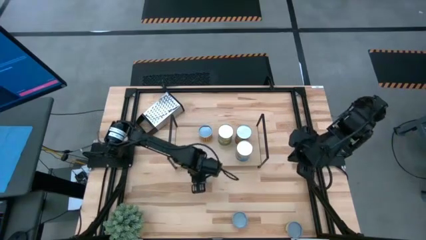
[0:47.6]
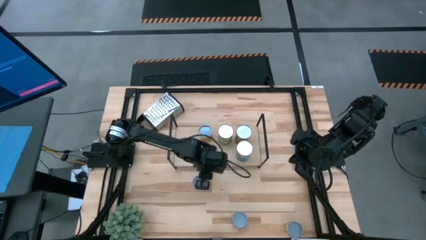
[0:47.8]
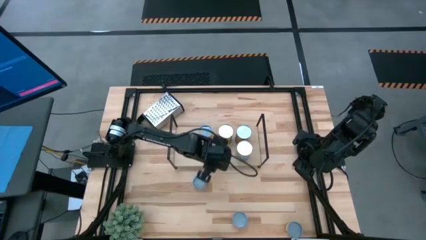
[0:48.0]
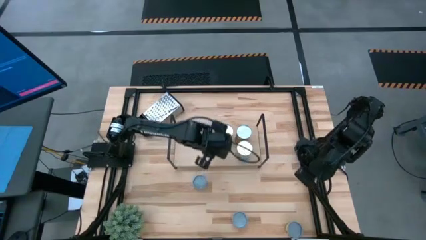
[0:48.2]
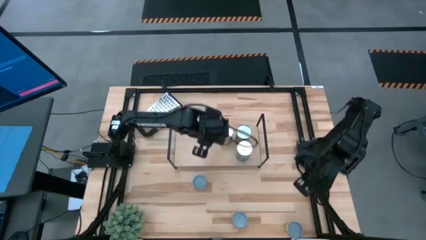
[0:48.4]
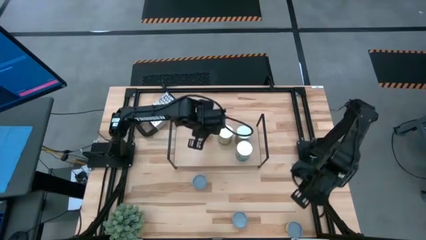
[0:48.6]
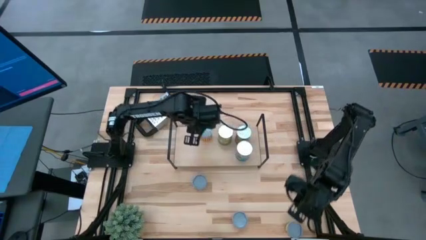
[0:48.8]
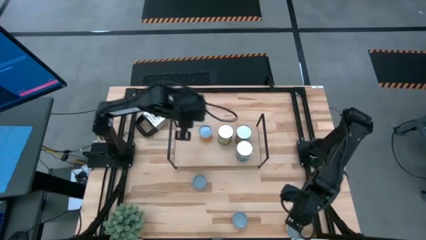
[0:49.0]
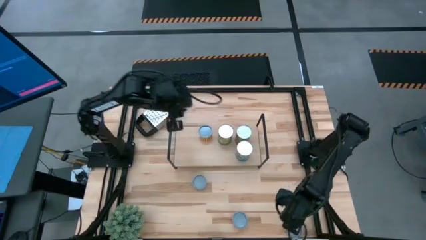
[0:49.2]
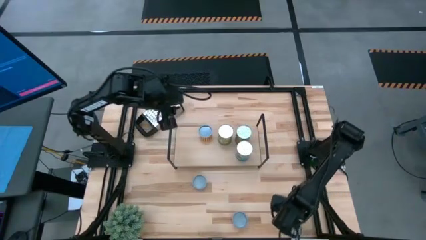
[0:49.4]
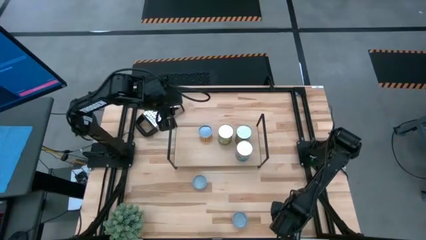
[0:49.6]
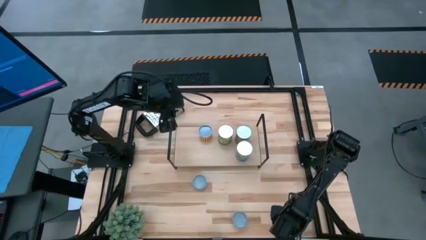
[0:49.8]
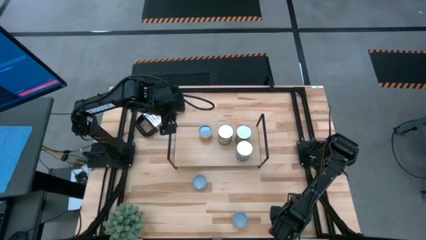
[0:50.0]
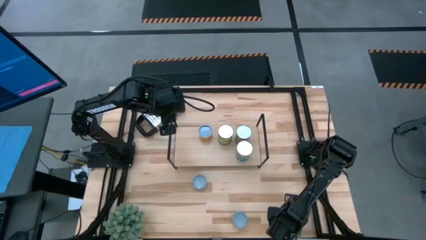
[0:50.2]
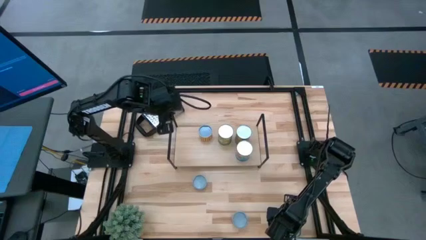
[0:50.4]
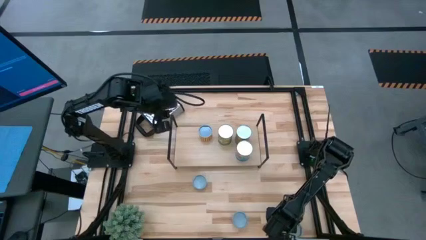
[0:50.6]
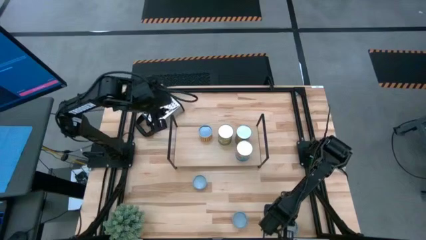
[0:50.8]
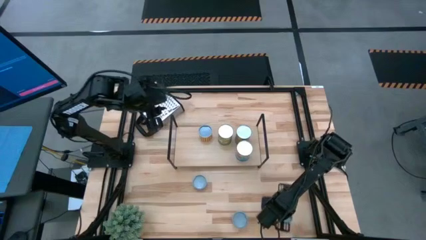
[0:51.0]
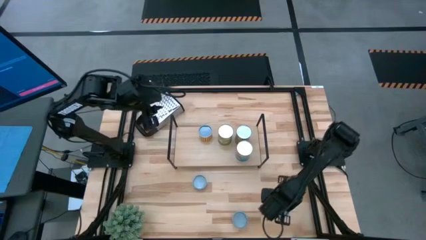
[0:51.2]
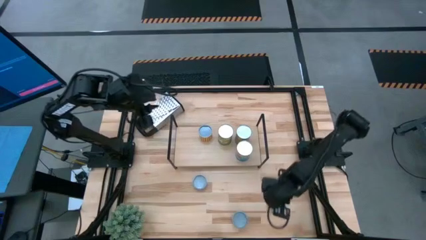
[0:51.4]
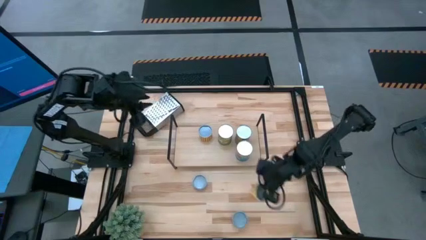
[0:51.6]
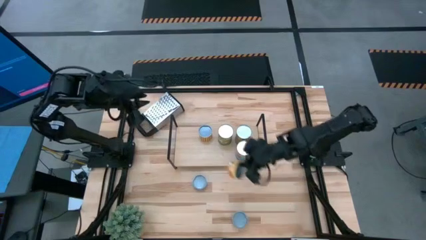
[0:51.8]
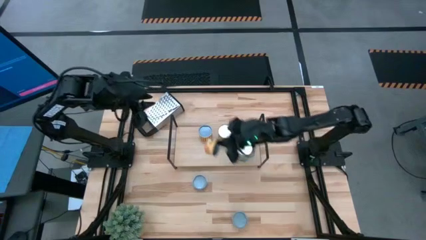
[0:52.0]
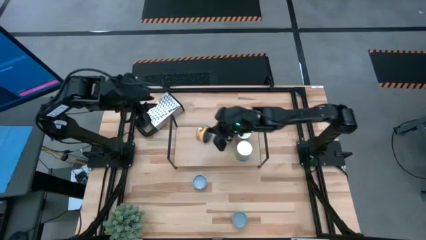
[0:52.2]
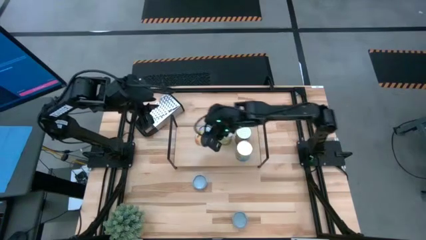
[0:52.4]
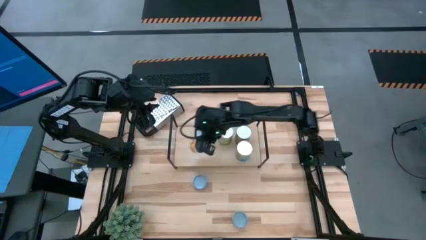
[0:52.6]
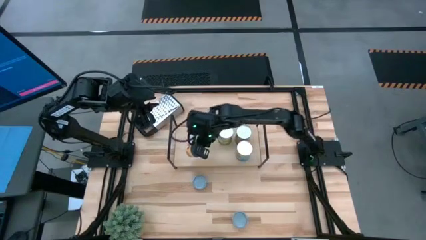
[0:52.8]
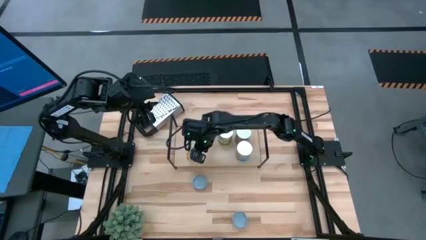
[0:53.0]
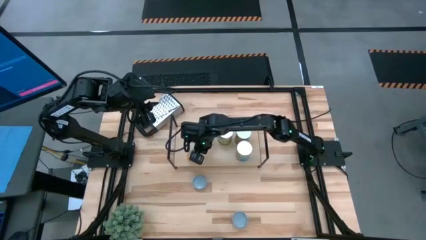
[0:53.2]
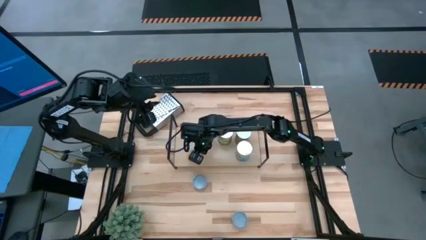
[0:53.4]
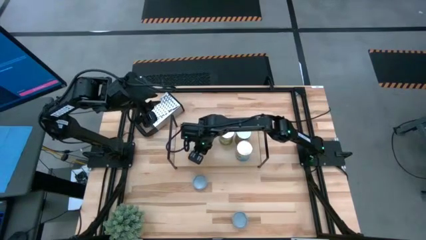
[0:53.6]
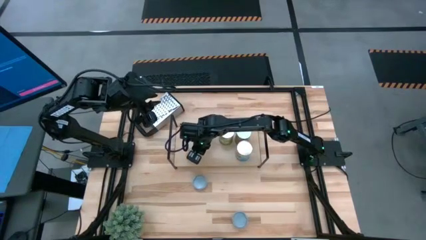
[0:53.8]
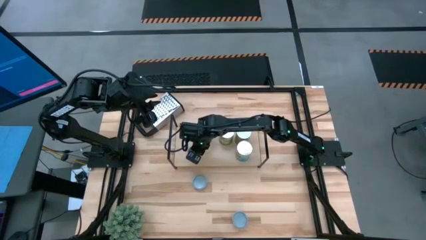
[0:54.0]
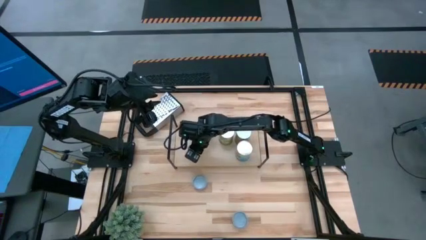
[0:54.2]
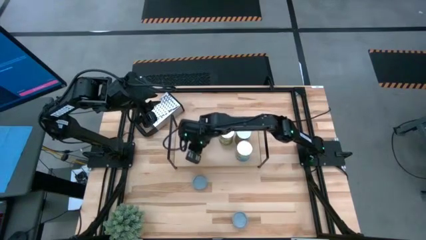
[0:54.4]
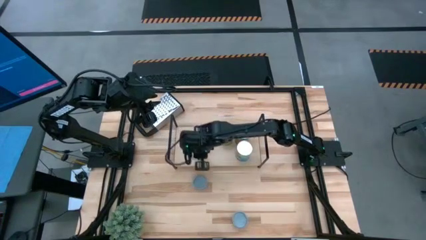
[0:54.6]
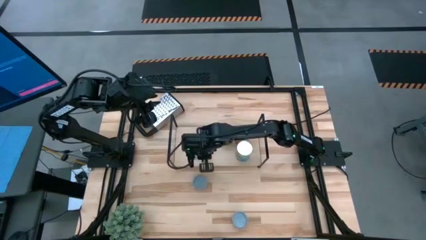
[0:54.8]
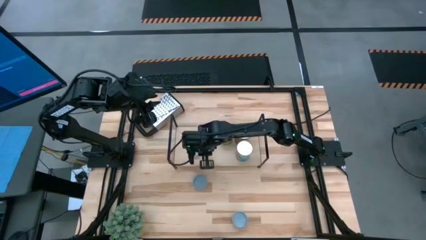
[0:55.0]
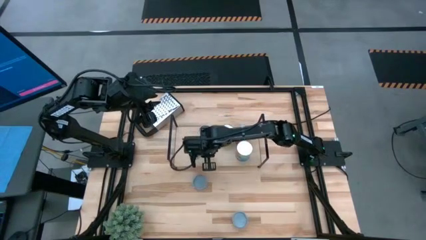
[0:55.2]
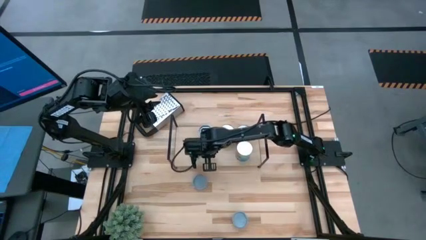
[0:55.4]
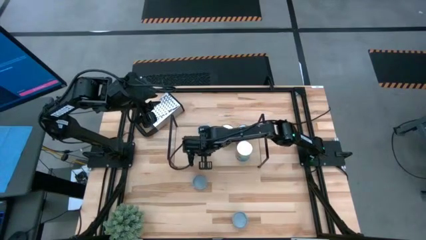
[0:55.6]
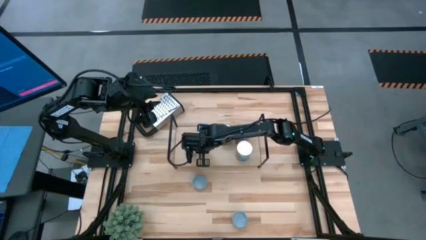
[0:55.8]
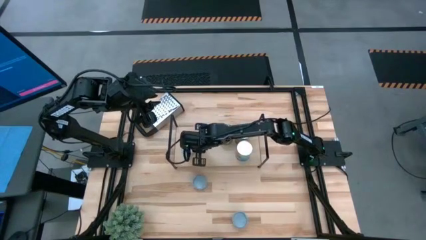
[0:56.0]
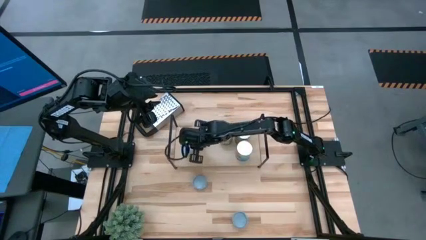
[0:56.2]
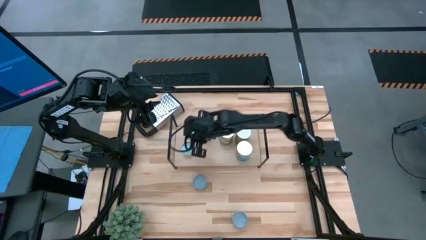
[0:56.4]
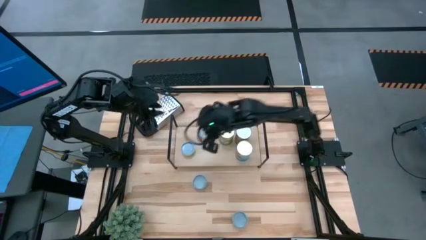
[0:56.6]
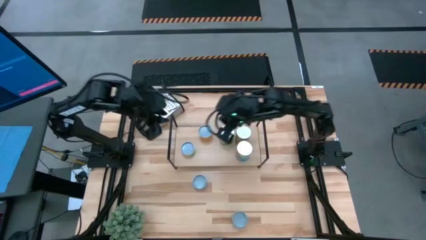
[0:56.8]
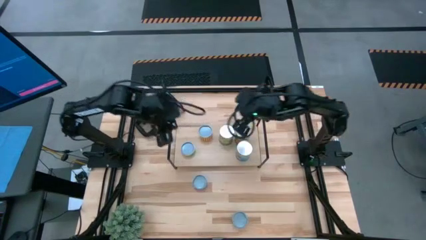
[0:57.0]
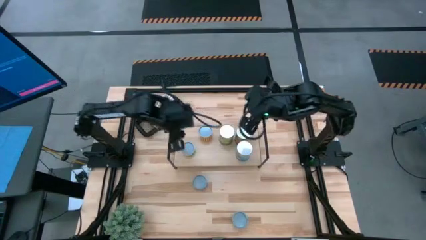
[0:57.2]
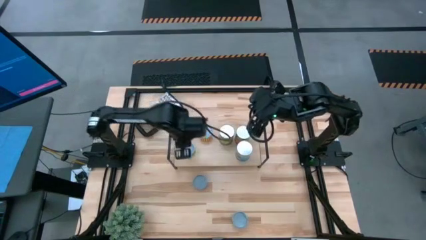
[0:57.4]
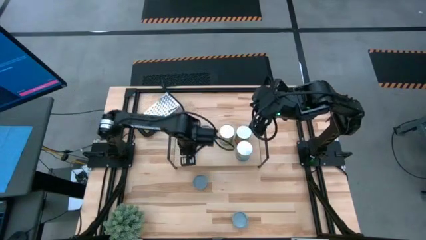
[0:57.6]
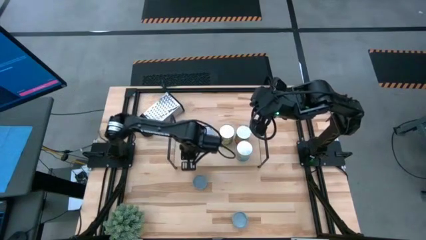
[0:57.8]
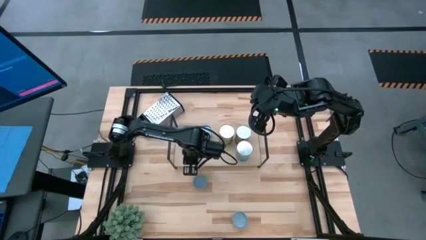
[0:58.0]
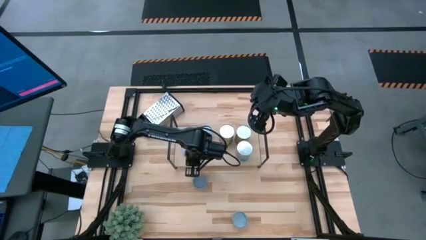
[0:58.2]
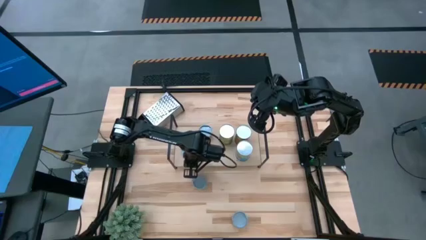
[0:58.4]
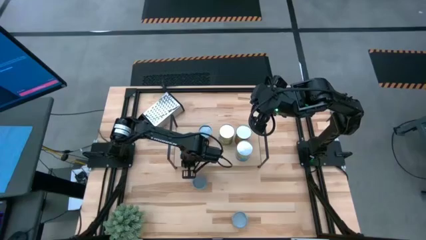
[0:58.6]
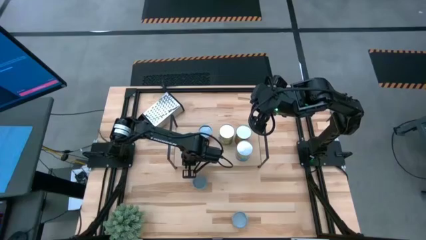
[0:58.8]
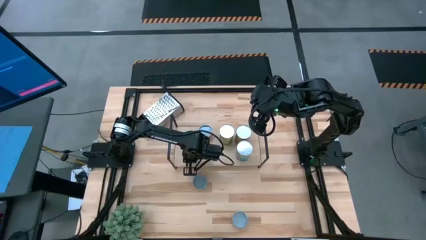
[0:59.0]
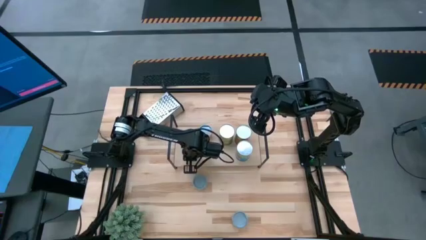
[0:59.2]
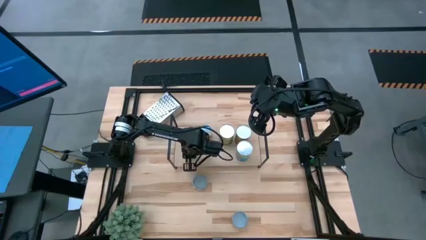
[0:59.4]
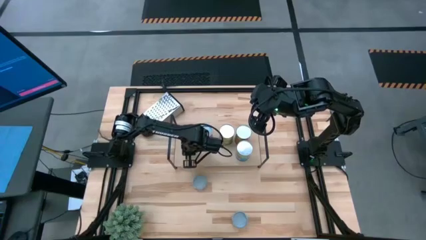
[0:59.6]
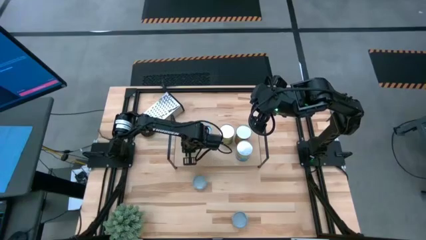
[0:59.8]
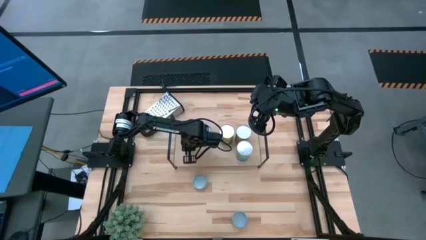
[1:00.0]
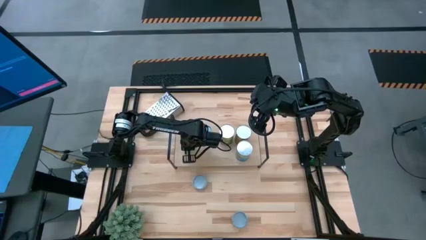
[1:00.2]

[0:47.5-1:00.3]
Task: Pick and place cans onto a shelf
Put the canned mushrooms on the shelf

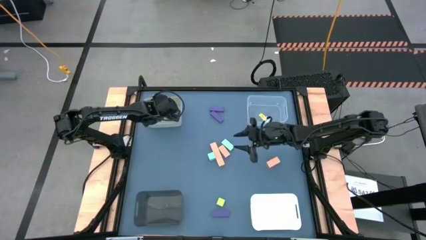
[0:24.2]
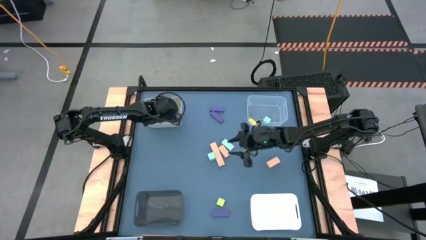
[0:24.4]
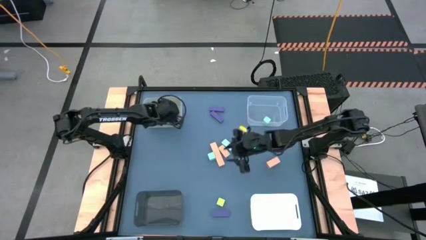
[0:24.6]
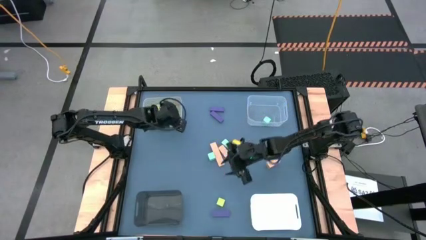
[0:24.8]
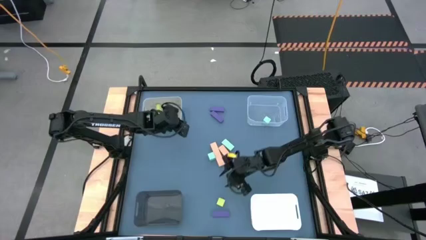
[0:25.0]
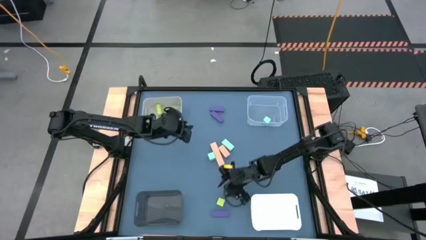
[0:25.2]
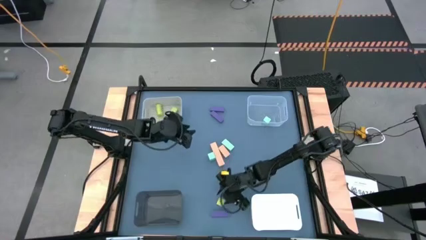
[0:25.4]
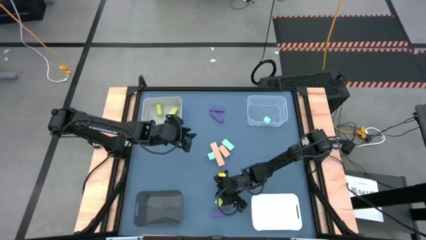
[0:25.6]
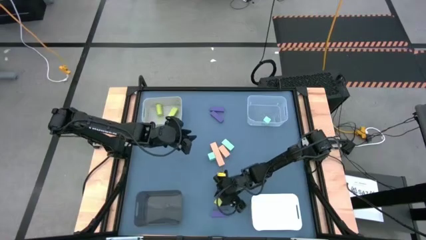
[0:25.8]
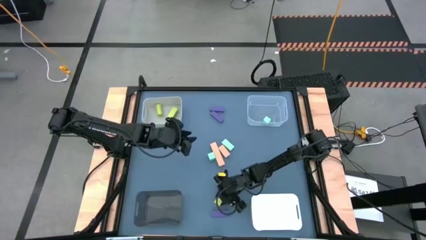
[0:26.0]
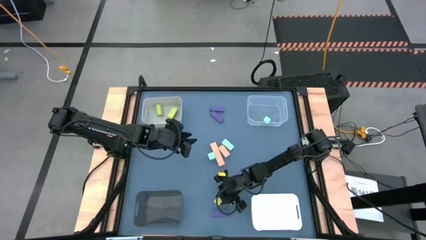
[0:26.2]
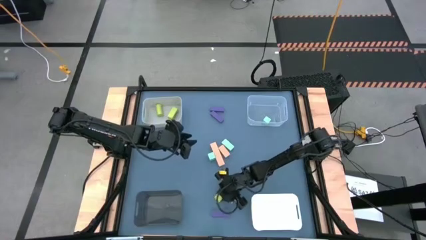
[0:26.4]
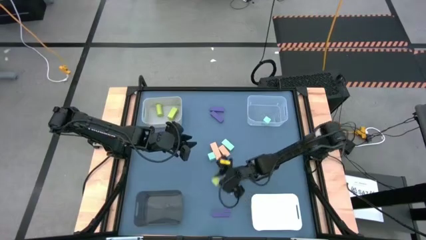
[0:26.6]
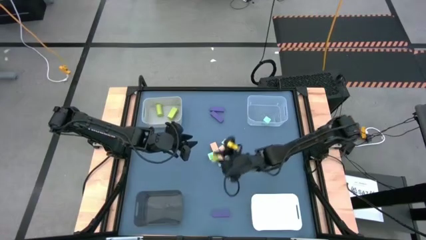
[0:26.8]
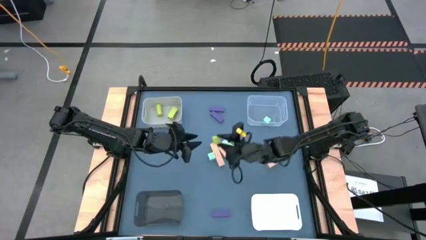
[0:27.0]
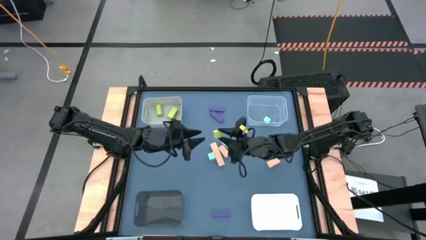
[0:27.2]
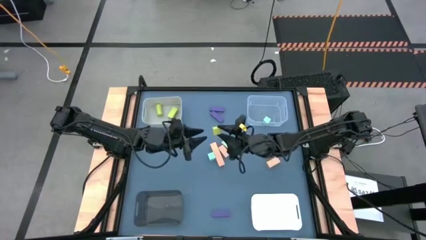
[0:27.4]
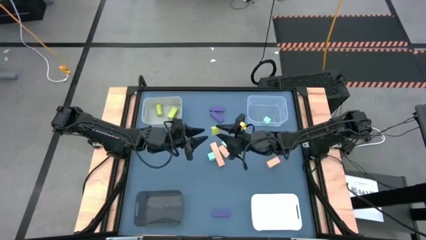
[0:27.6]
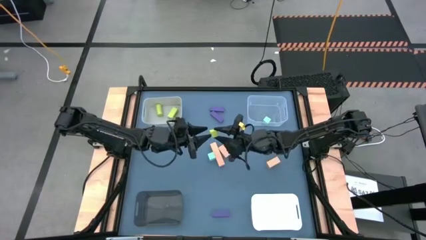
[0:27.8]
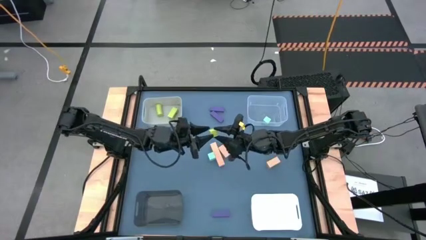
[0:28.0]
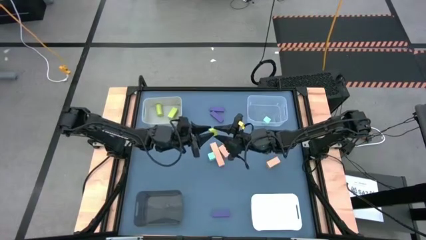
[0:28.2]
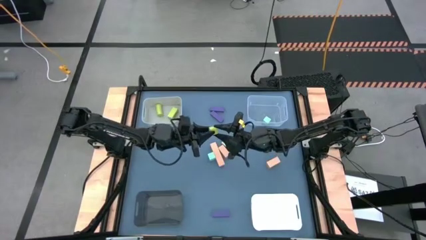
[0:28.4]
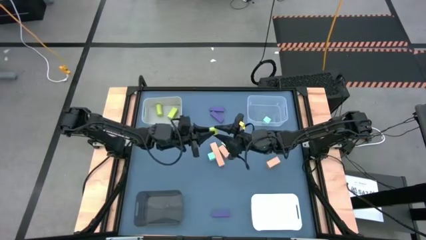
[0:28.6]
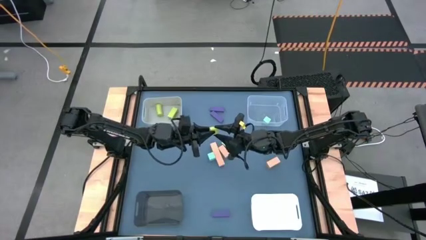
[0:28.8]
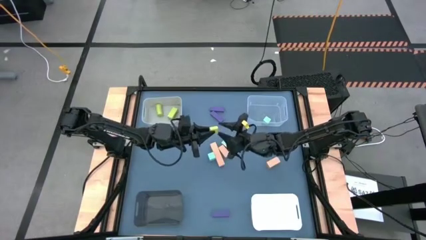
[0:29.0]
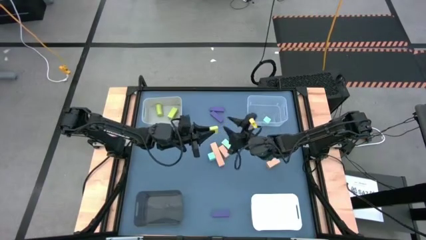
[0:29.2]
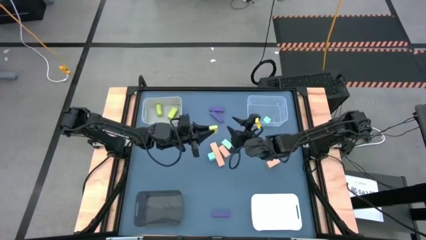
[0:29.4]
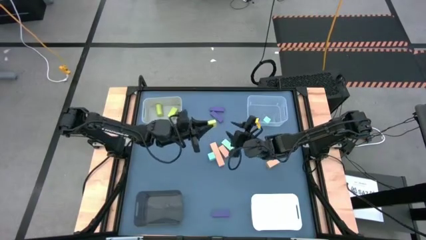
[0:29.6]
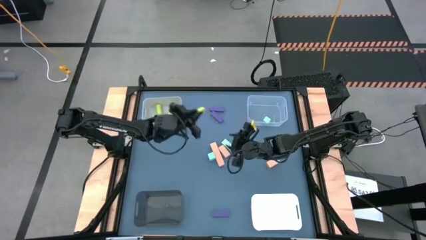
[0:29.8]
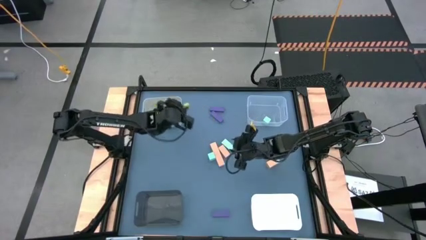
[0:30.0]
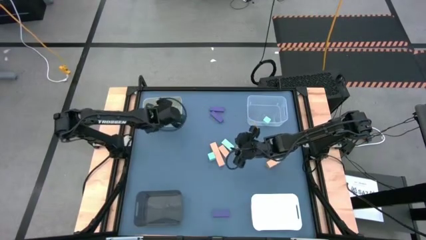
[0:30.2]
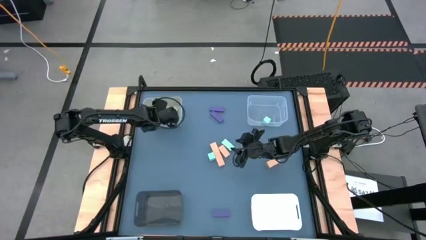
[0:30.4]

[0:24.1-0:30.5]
Task: Sort & place blocks by color
Put the green block into the gray bin
